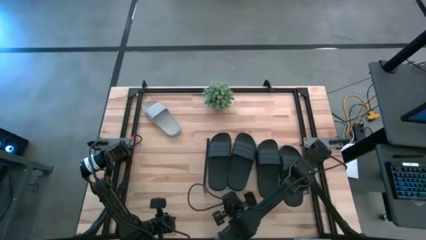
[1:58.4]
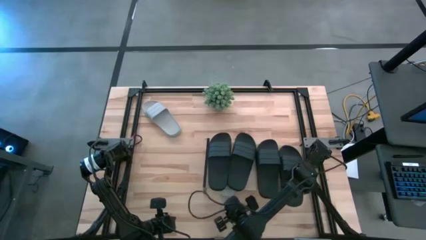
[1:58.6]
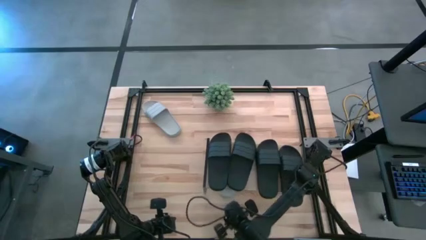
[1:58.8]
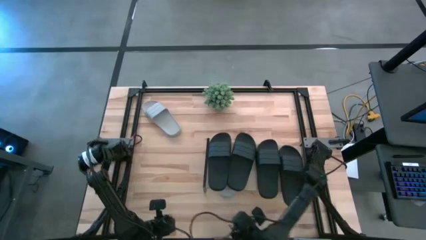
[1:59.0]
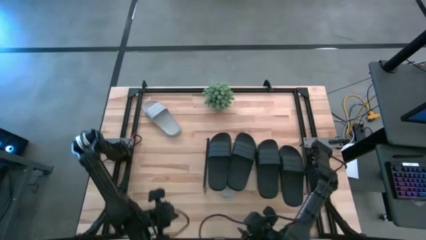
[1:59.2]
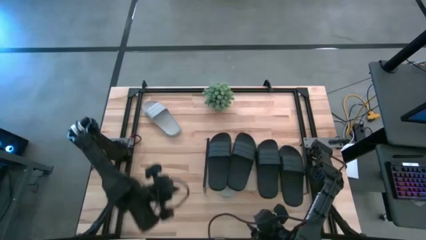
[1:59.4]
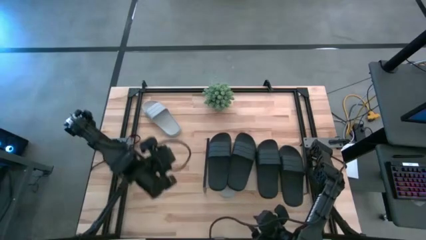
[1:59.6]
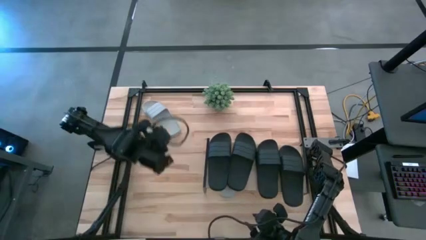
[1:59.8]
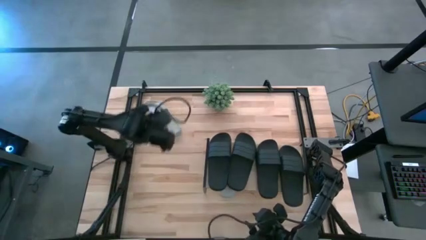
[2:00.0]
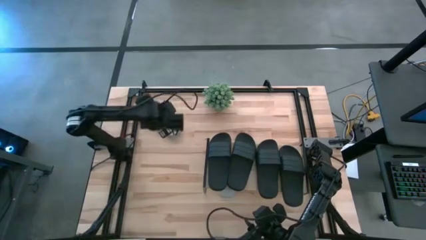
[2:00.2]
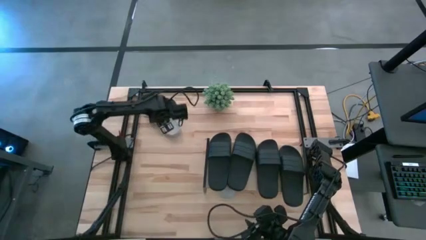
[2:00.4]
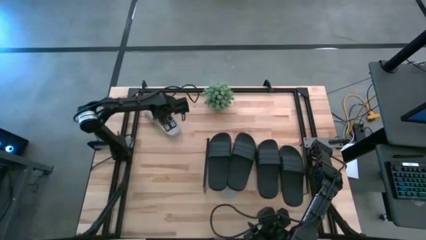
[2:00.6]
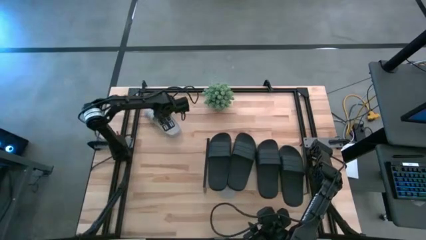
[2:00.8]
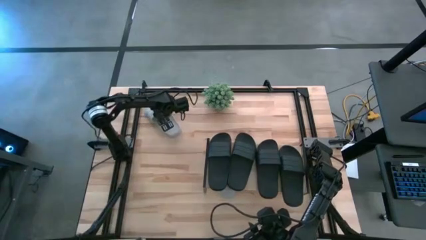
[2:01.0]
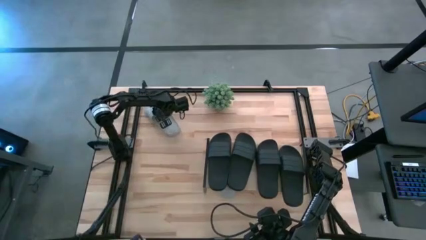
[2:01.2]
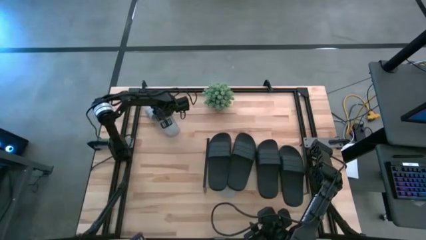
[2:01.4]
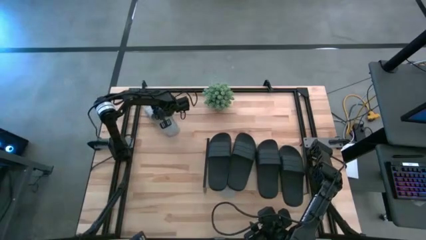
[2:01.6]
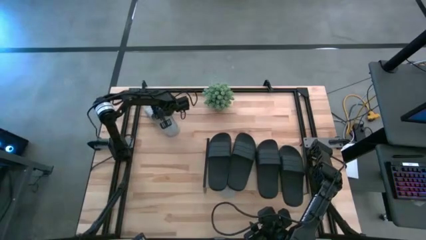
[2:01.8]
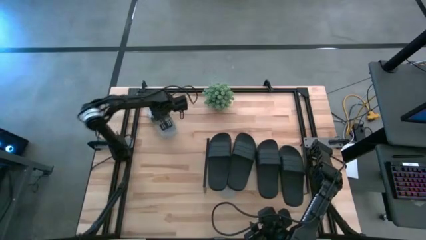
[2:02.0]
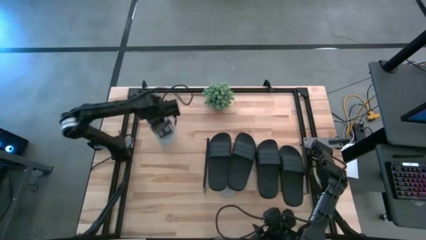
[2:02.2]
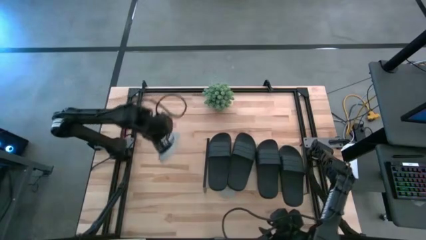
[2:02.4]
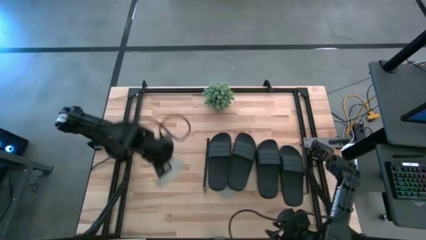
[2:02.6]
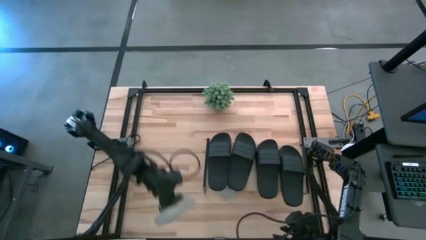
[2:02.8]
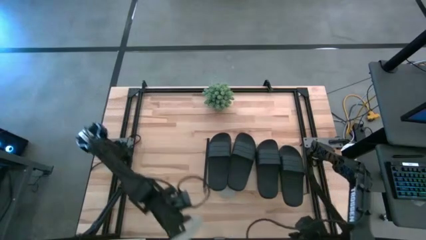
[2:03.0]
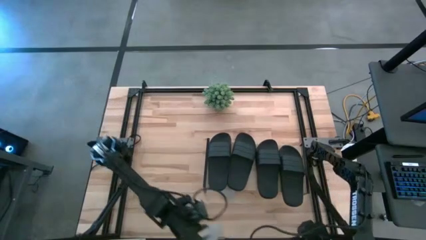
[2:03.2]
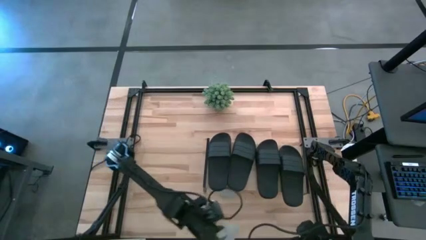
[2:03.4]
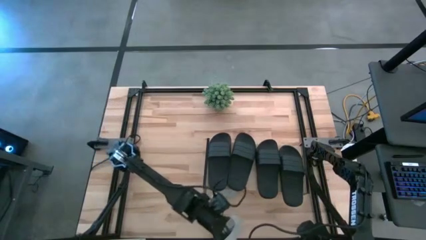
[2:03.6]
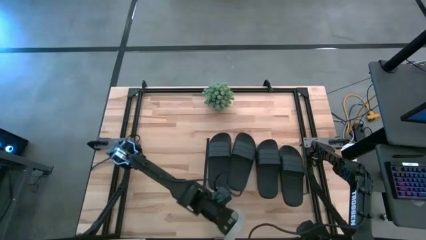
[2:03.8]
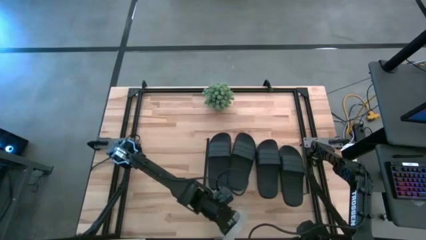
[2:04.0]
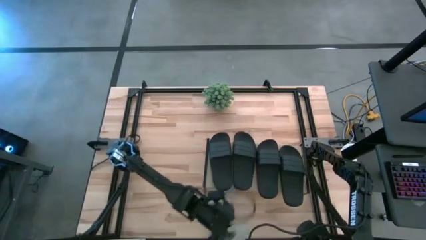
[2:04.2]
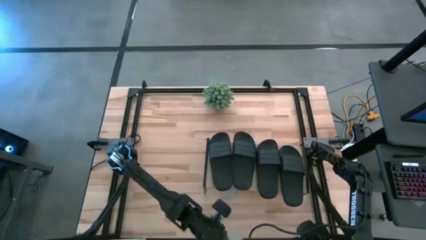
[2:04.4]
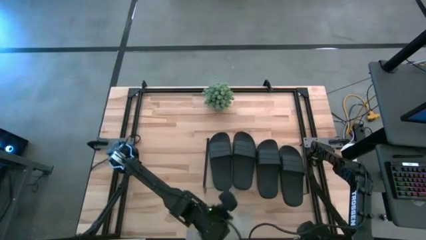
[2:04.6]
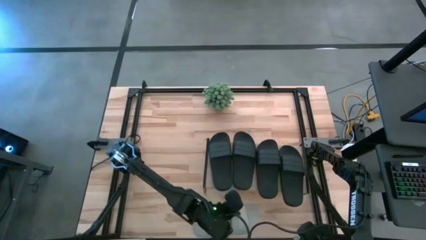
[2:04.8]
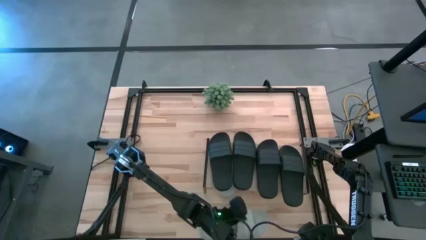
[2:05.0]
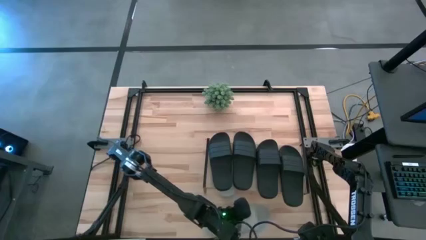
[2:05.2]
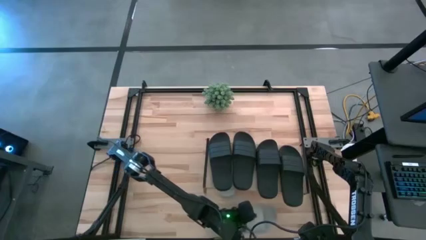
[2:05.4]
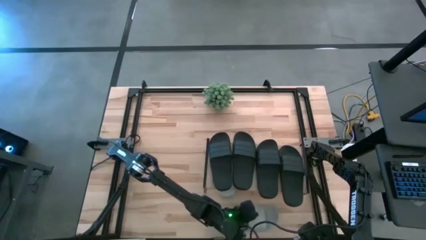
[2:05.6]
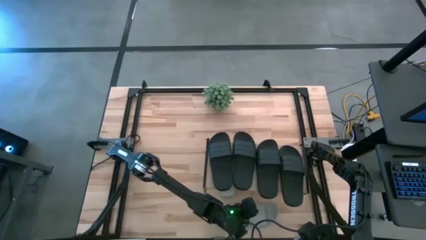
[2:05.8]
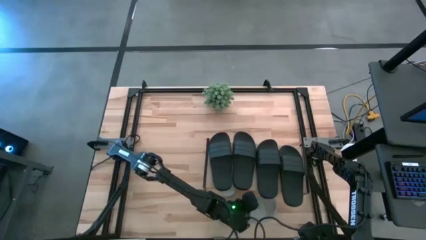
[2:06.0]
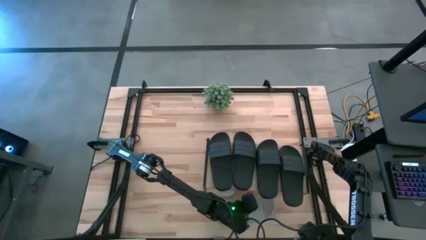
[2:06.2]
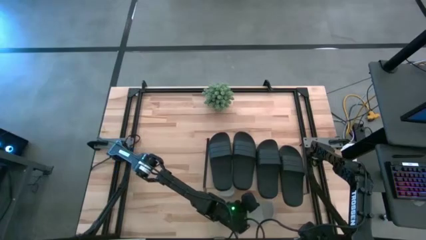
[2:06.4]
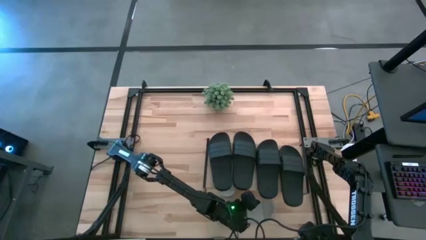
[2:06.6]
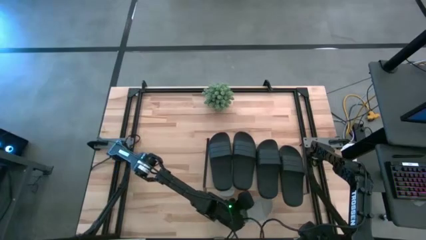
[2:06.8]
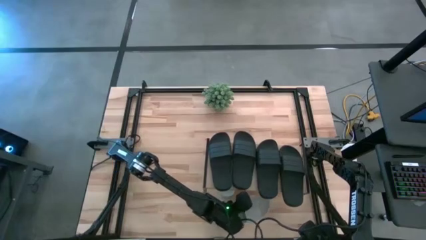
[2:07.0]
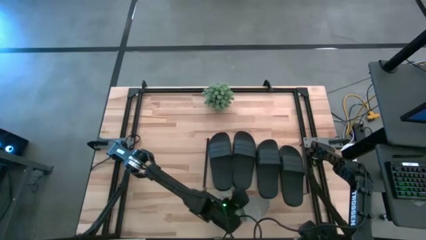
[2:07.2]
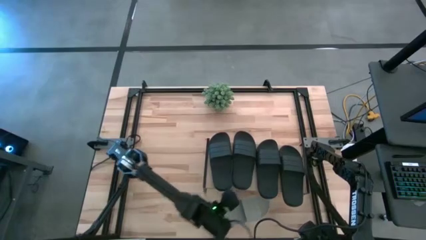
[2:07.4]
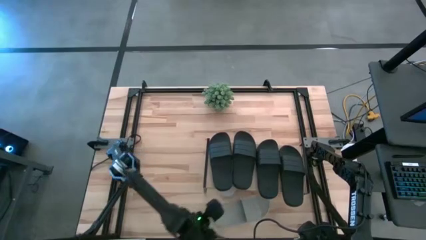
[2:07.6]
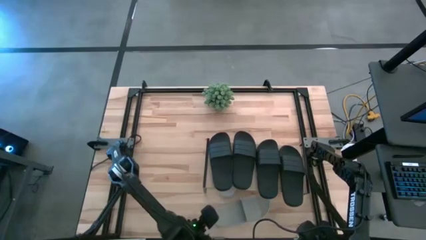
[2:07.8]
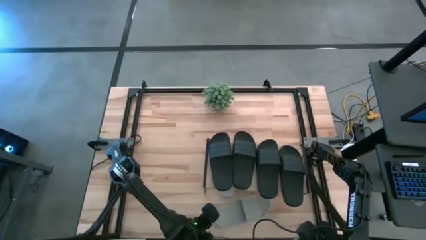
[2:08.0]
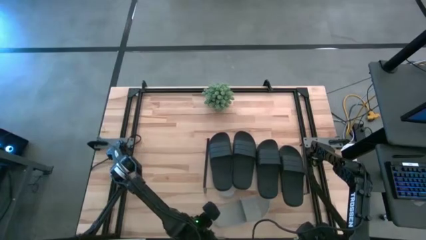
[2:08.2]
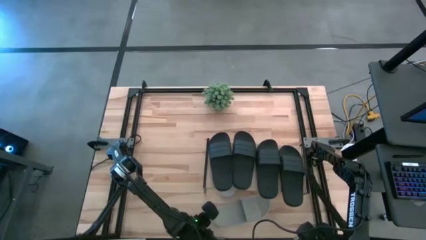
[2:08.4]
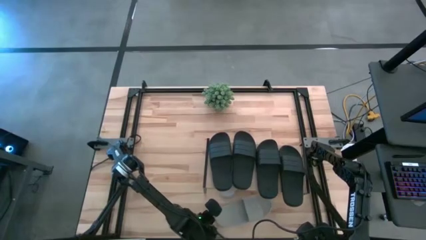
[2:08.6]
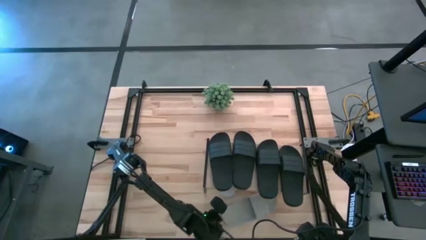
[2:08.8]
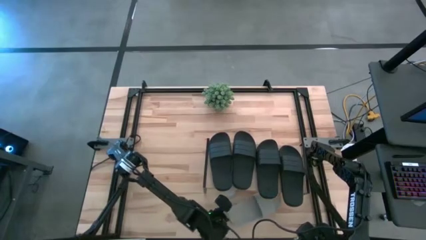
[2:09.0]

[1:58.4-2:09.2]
Task: Pick and place slides into the shelf
Put the white slipper under the shelf
